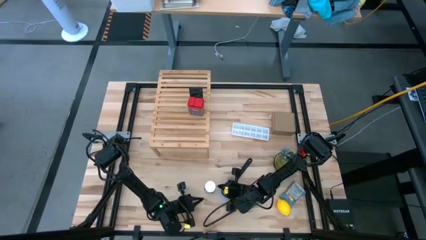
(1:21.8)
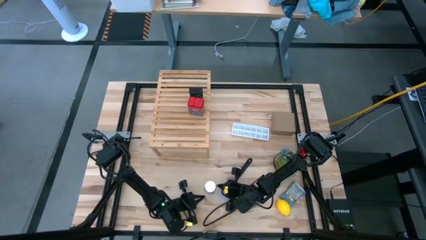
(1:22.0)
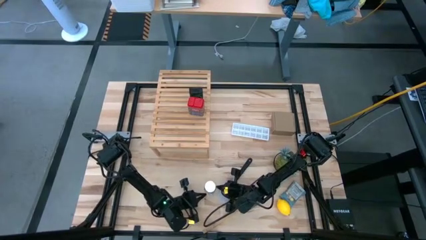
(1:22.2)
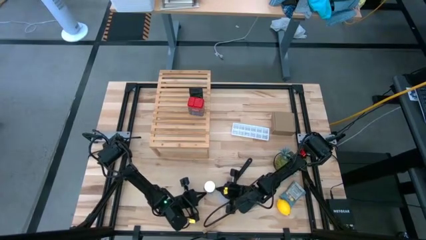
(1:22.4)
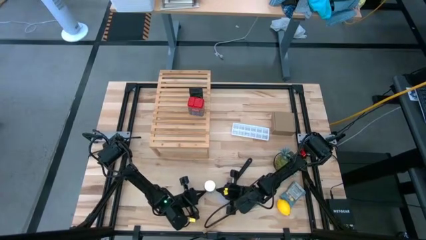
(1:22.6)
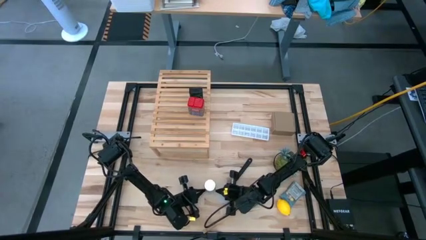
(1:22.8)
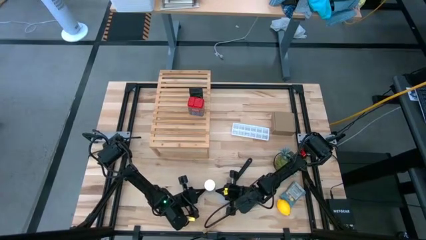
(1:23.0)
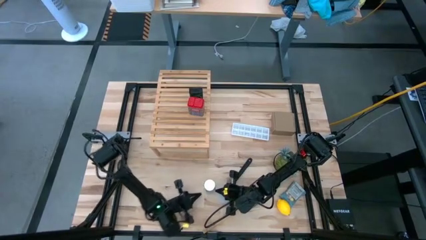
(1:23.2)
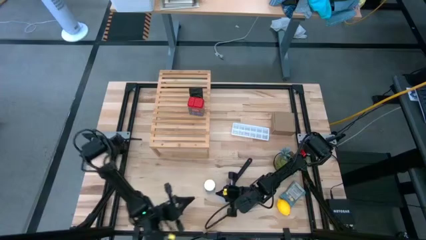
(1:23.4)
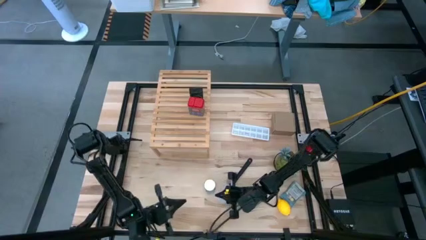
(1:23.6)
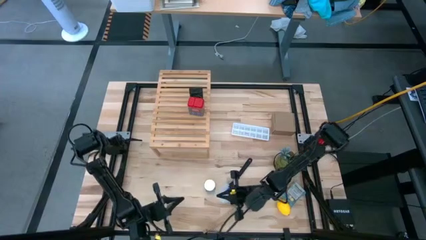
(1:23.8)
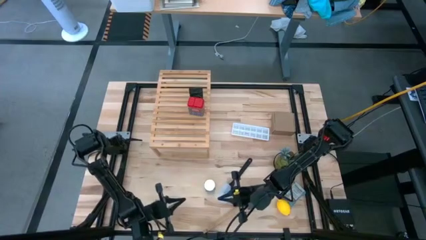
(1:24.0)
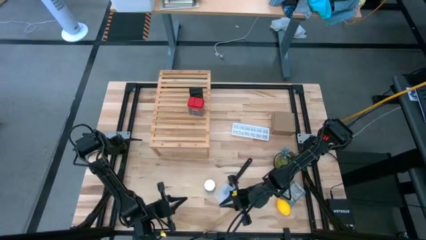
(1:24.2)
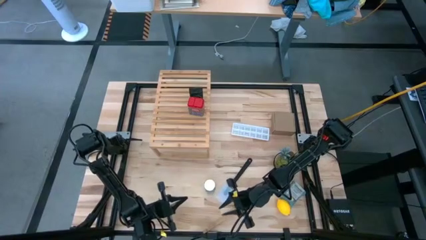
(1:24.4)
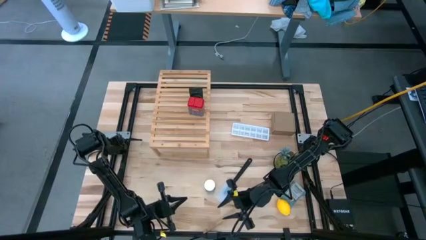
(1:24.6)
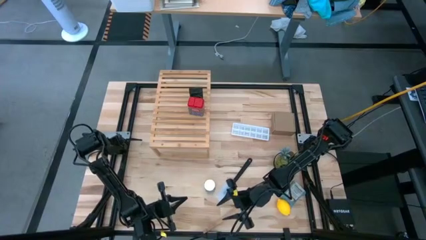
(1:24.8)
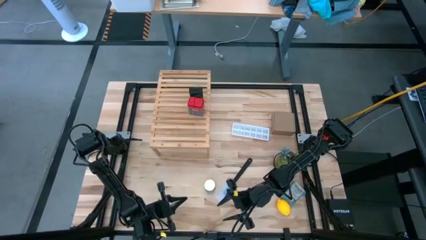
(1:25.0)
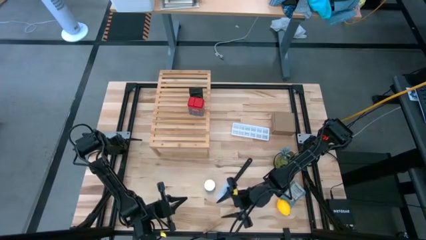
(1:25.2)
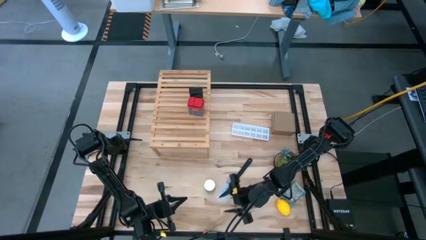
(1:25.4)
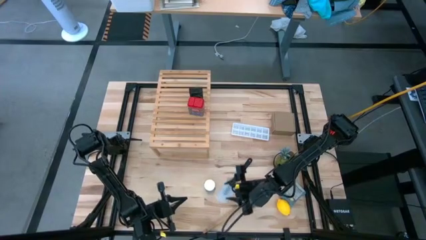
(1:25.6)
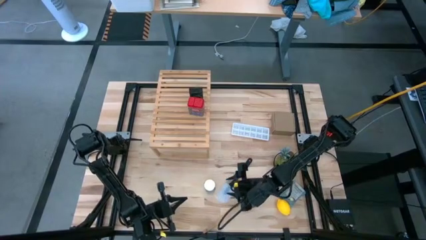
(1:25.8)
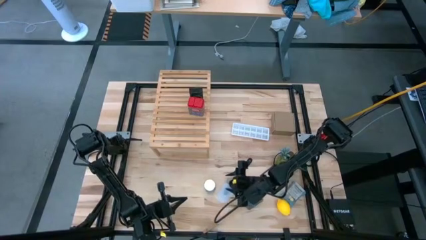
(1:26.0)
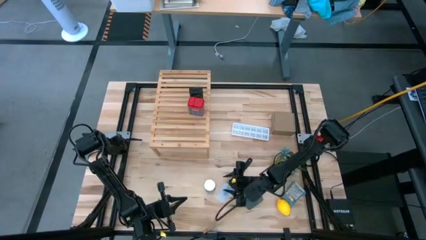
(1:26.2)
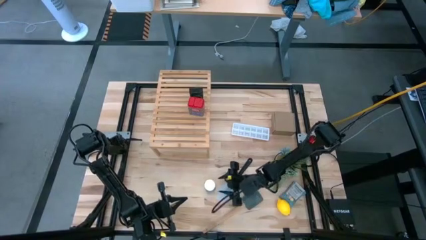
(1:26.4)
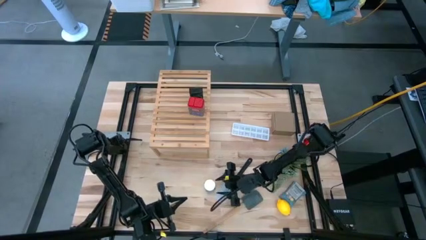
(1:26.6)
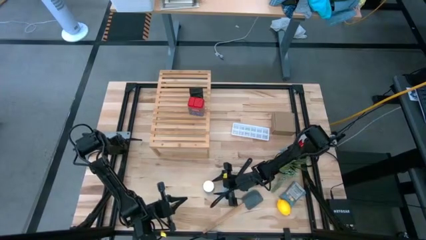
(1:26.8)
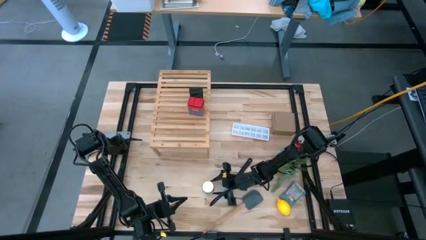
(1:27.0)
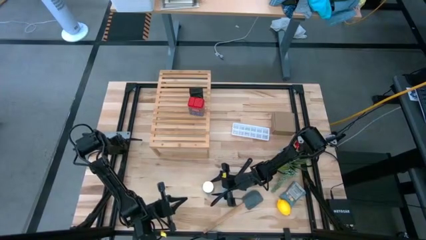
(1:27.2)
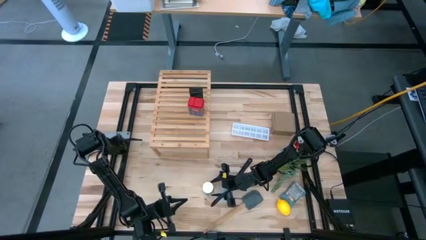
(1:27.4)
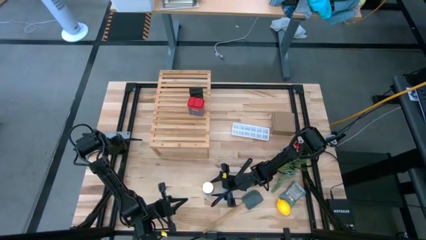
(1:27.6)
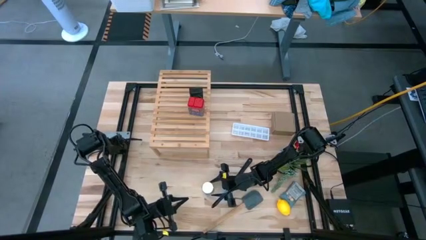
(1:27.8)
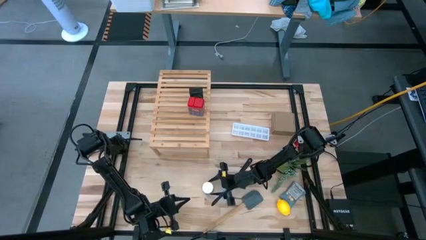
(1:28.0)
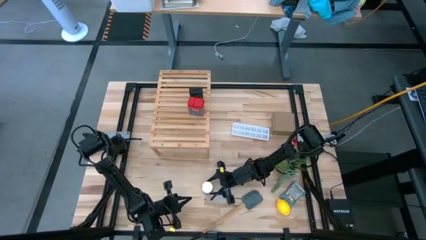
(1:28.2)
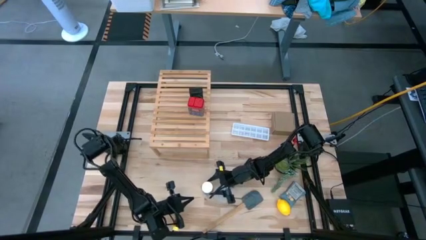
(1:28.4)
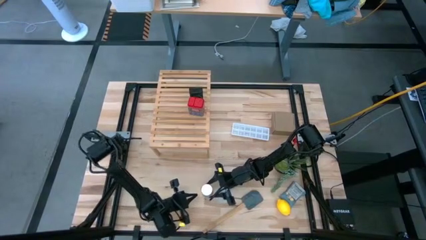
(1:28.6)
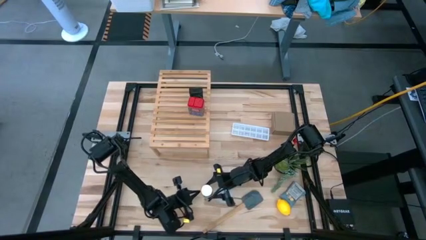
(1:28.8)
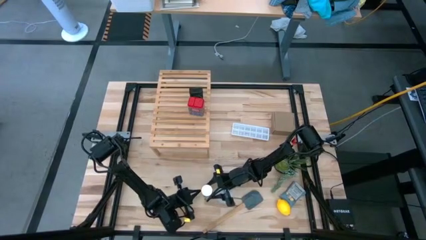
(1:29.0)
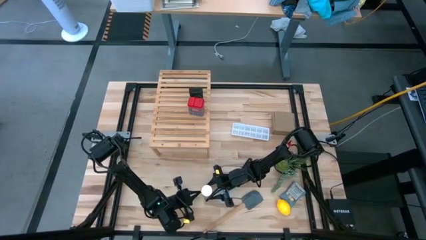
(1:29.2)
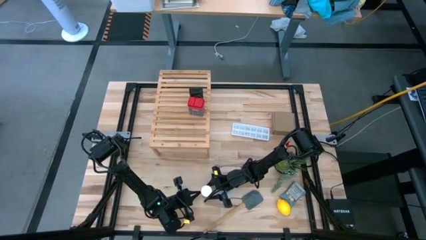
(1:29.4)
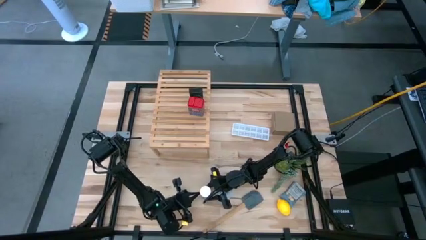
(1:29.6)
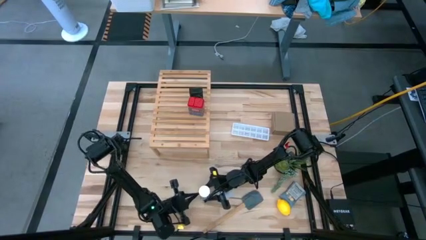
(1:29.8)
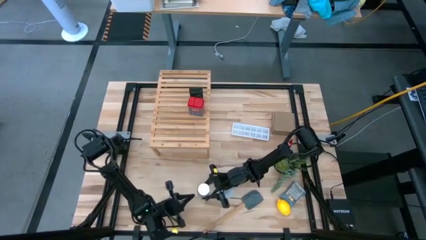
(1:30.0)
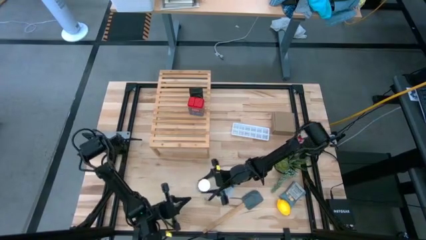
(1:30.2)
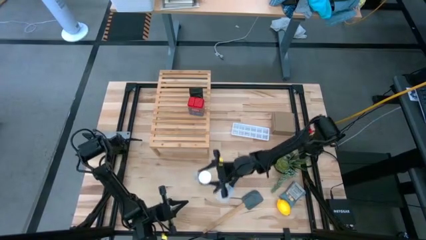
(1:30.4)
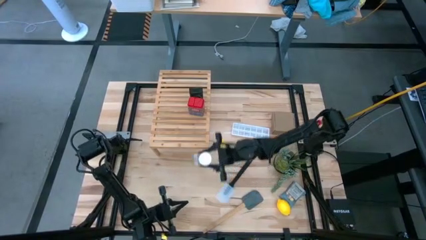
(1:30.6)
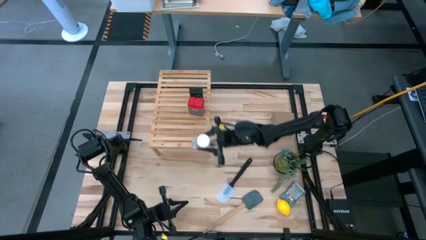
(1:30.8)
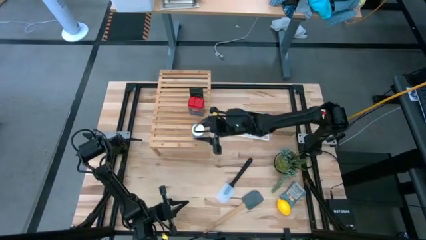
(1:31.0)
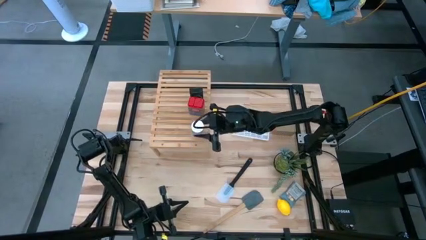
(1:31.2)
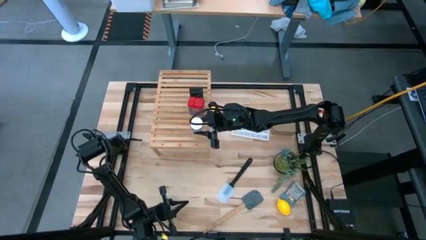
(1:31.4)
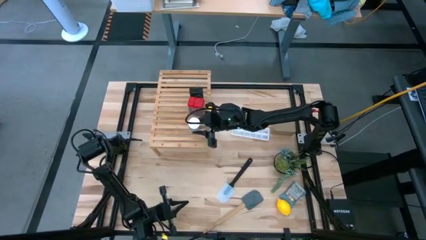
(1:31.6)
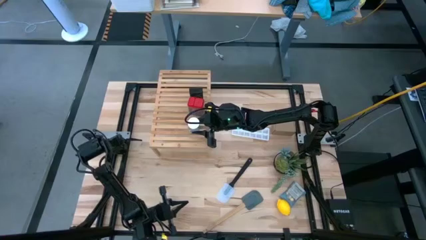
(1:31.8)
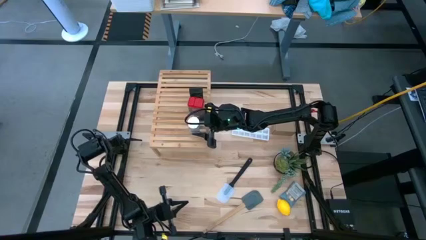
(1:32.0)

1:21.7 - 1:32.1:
Task: Shelf spices
Put the white seasoning bottle on the shelf

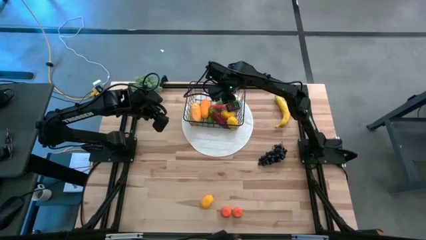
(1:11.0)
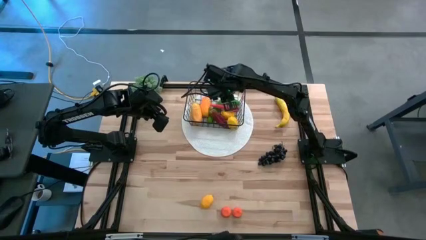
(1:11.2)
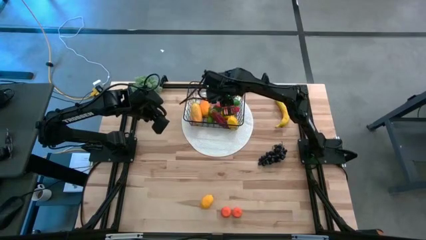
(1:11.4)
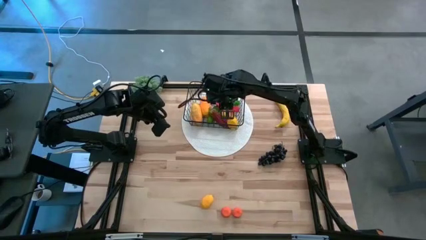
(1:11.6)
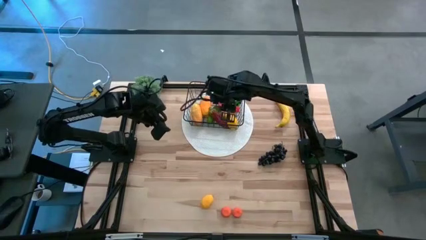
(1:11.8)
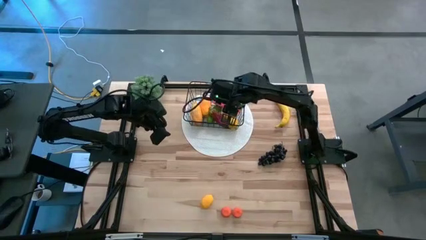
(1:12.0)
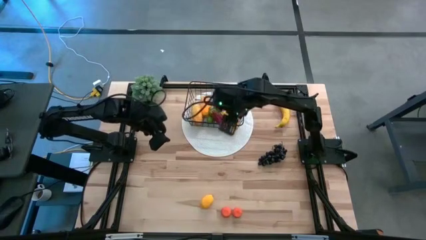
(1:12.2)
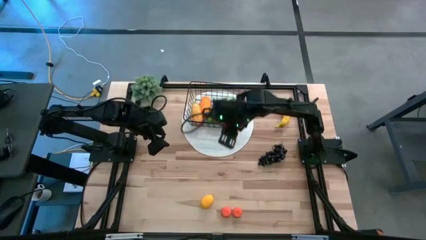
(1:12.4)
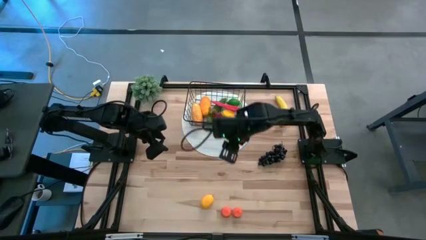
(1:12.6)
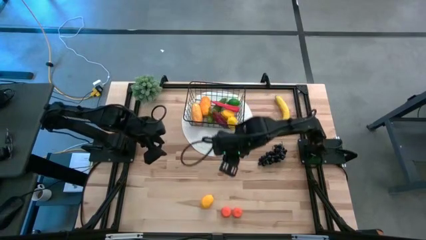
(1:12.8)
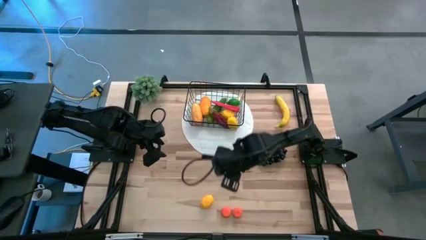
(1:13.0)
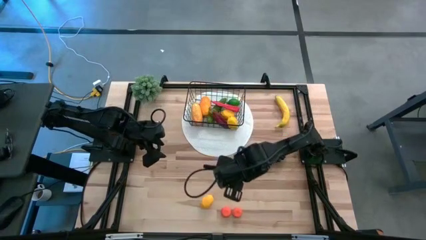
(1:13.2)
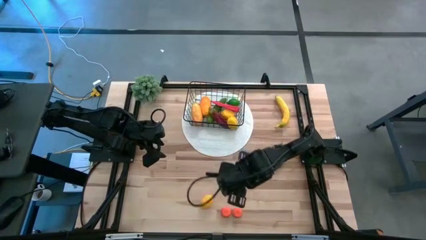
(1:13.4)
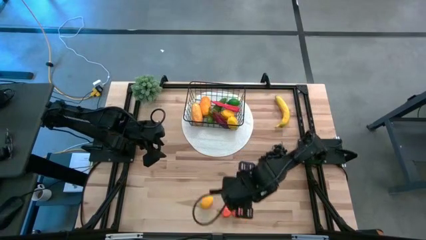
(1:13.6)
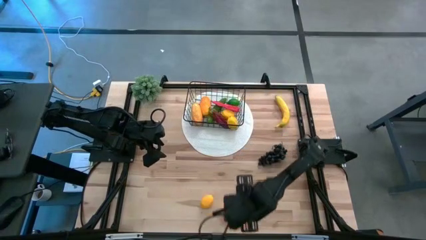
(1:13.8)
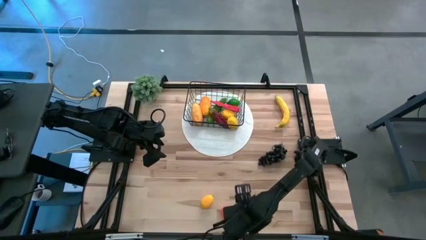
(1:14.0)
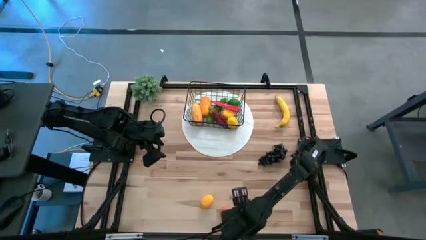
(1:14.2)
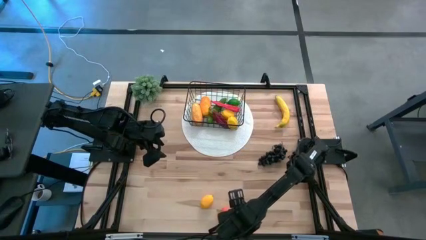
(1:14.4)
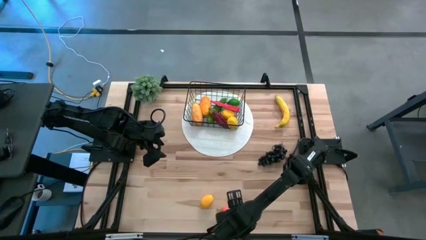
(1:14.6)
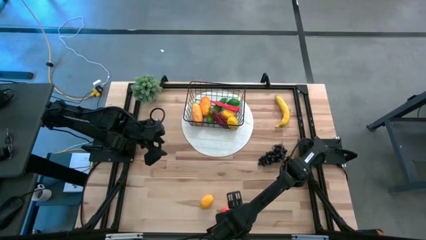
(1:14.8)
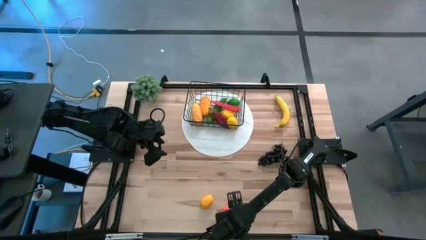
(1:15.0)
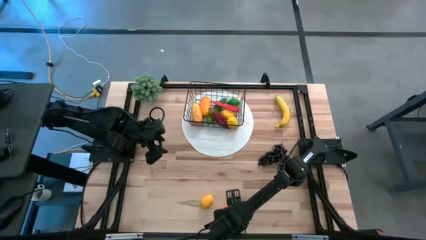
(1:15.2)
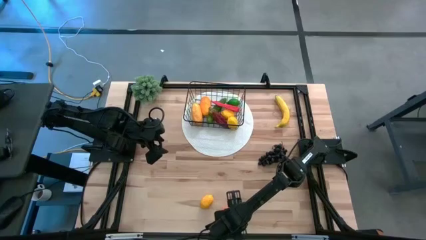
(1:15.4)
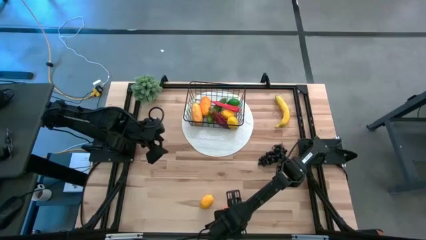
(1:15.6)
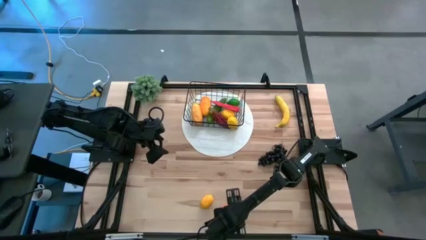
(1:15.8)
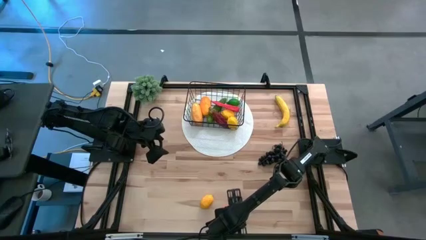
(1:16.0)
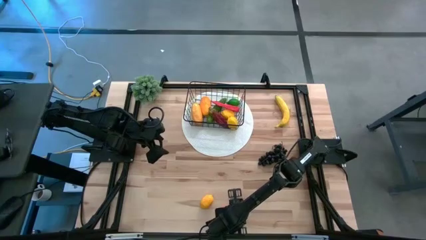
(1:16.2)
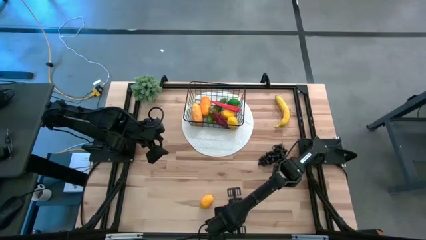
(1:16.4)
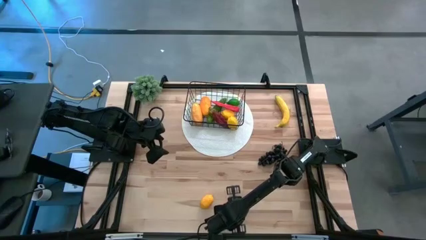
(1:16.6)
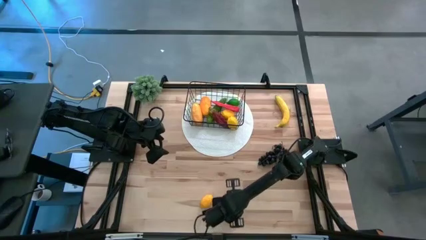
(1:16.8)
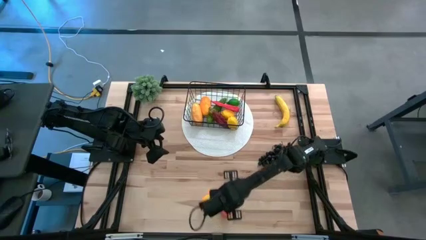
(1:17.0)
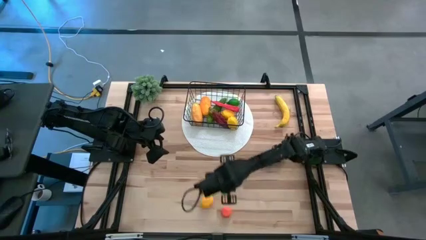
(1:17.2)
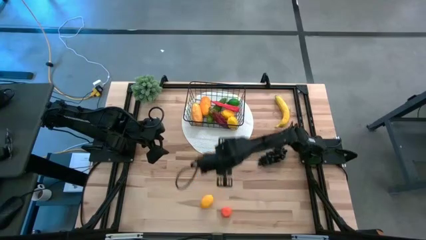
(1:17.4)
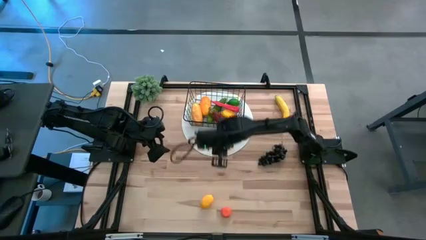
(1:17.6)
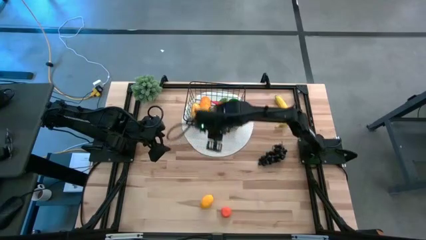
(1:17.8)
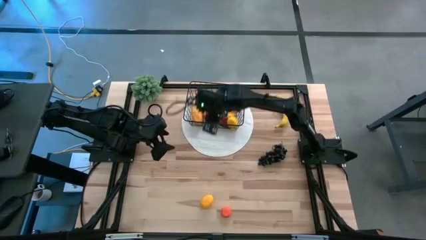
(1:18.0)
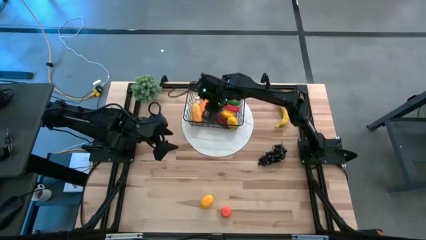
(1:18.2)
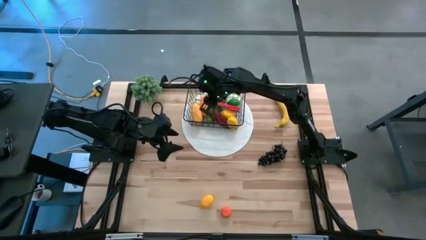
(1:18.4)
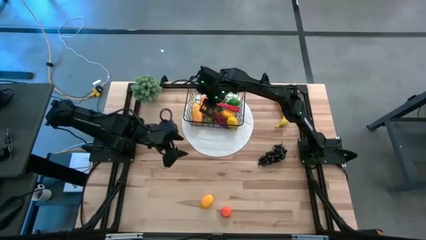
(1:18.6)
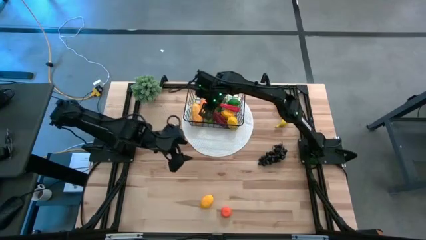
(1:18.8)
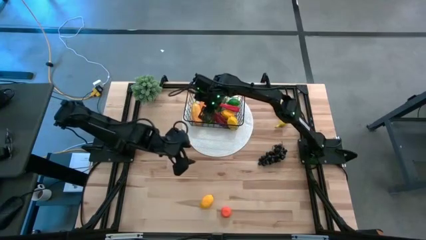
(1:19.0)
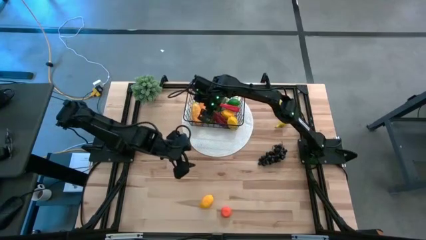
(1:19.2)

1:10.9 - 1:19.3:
Task: Build produce basket
Put the right orange into the wire basket
